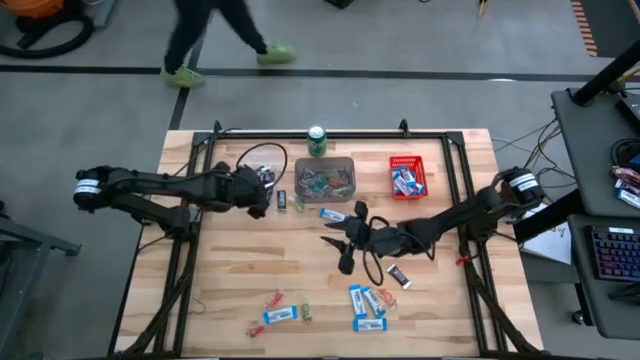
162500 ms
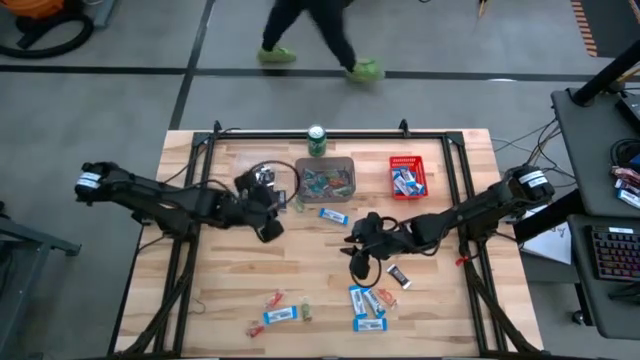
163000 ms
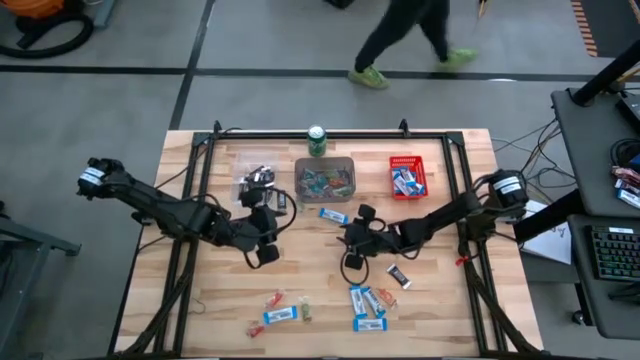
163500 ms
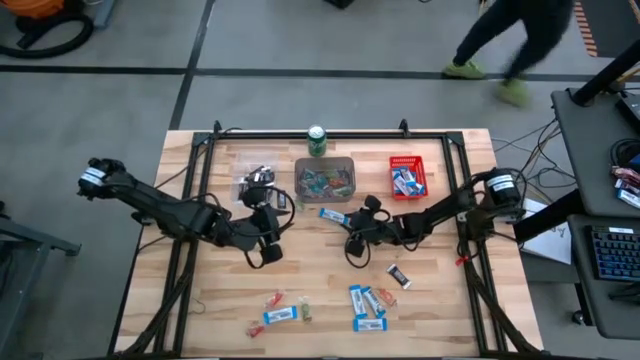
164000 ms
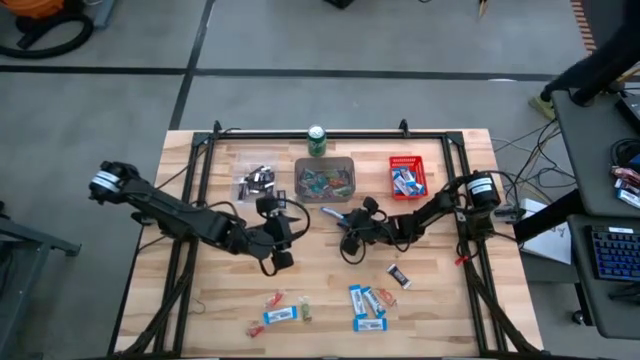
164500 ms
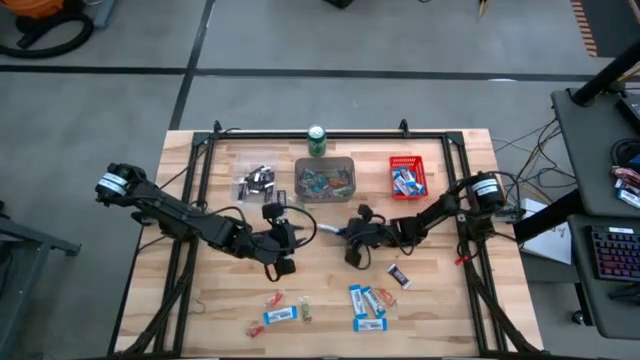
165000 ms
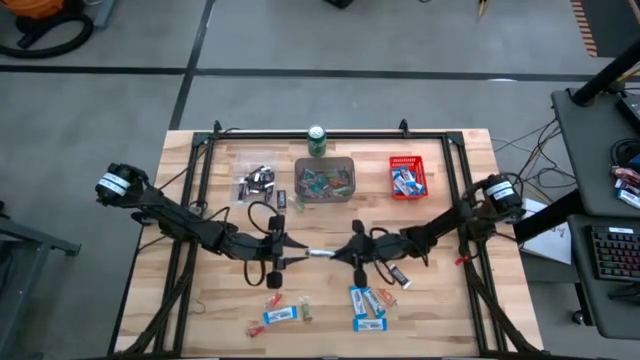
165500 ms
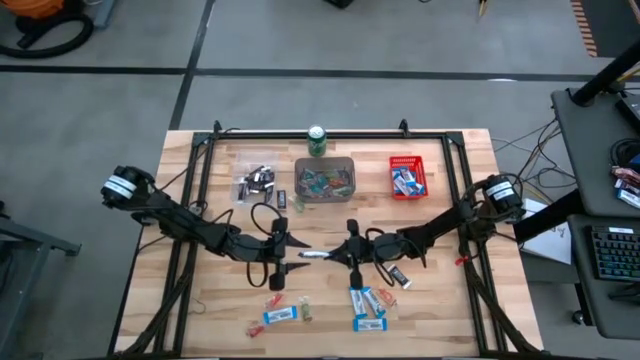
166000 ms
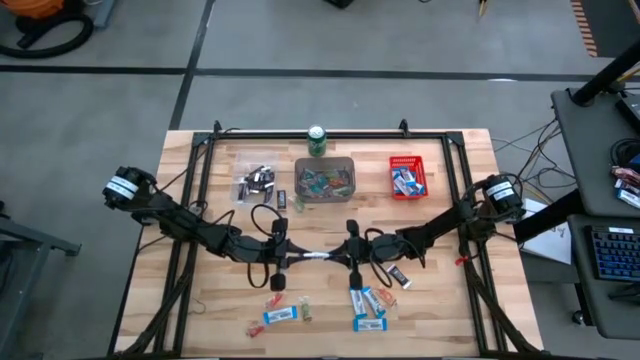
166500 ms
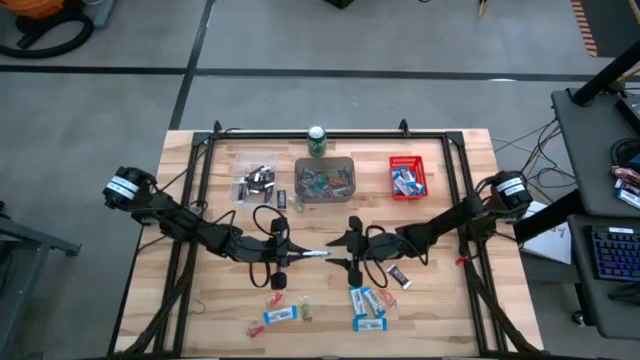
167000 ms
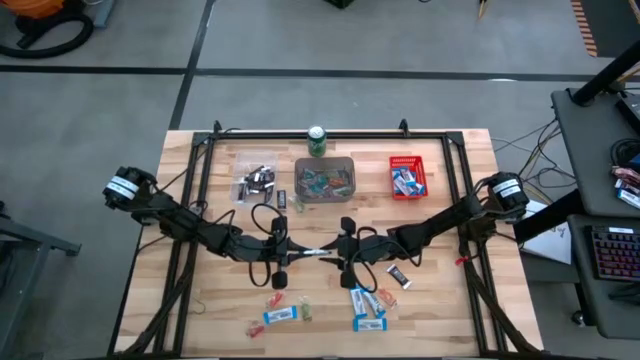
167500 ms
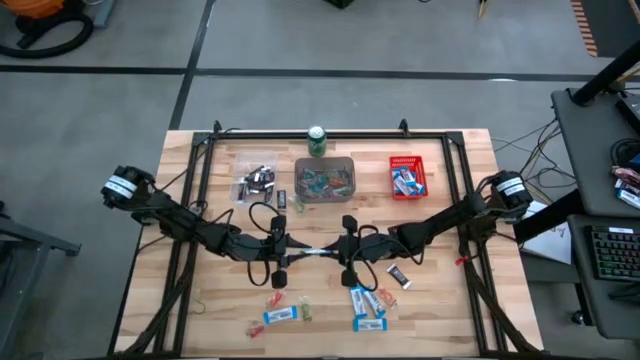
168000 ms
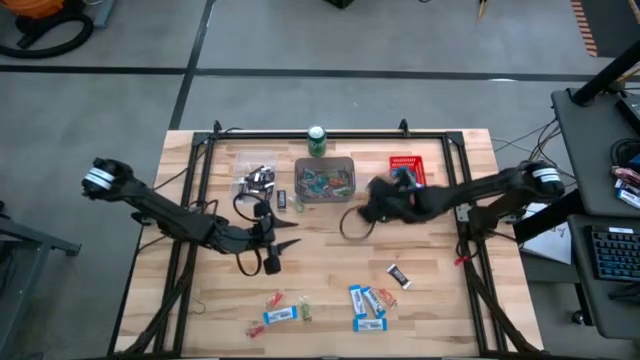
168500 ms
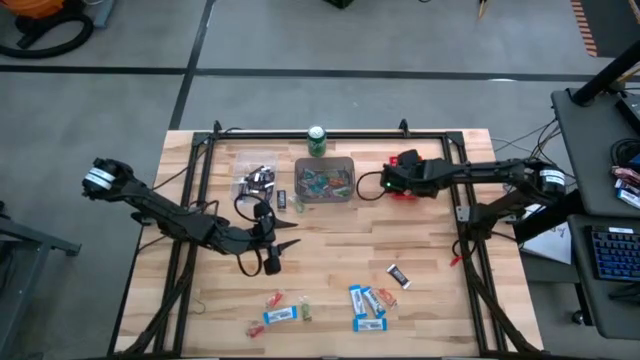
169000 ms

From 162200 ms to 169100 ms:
Task: Organize candy in baskets
Put the white chocolate bar into the red bin

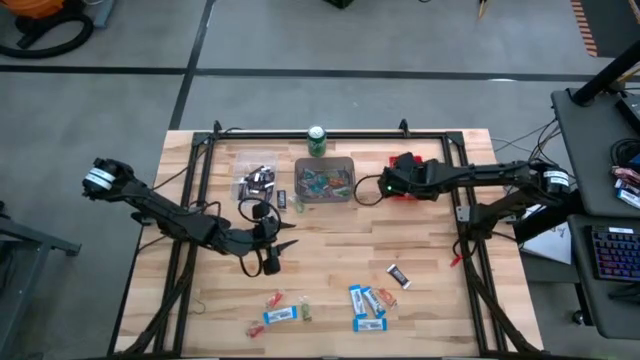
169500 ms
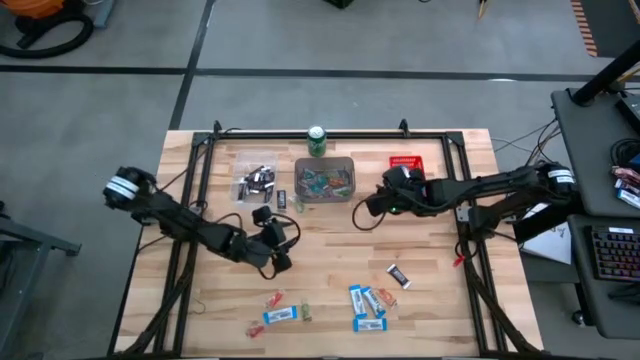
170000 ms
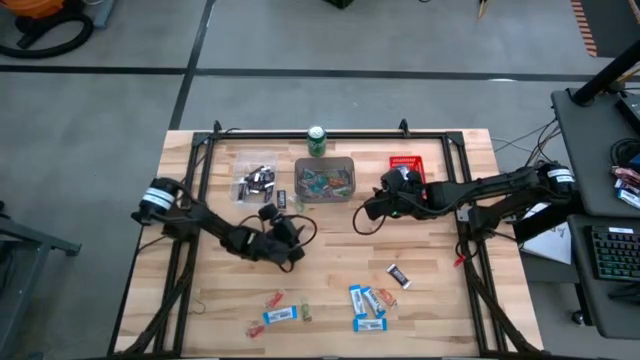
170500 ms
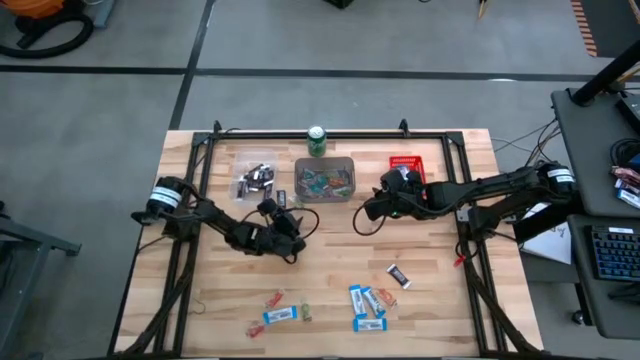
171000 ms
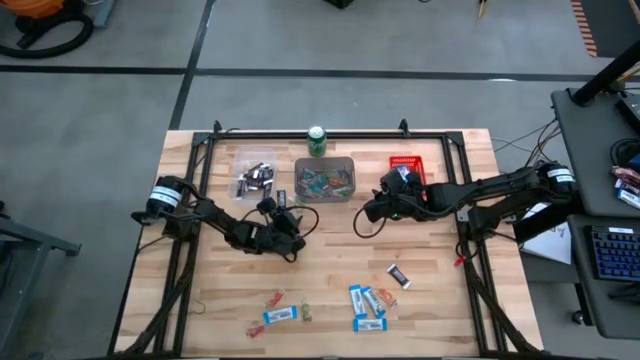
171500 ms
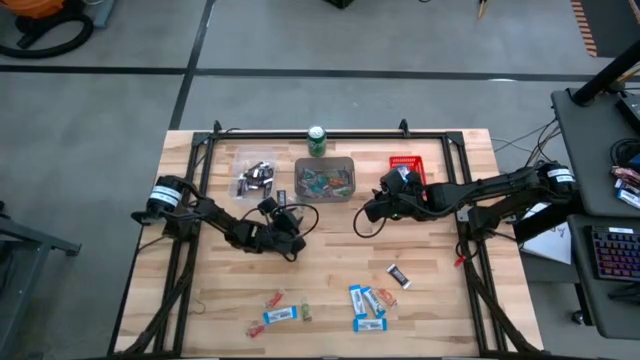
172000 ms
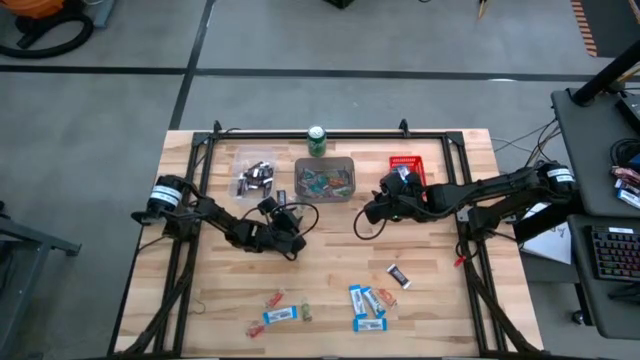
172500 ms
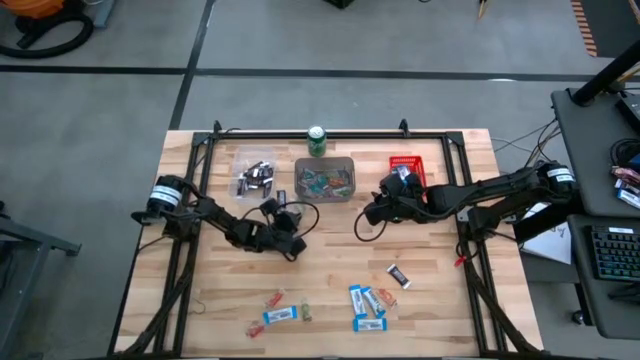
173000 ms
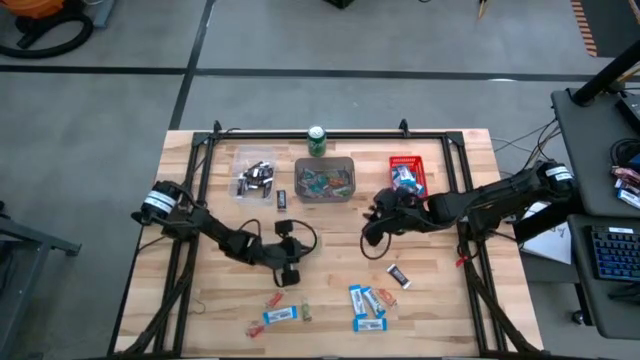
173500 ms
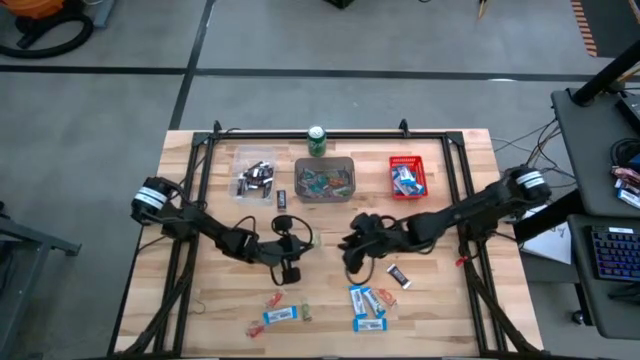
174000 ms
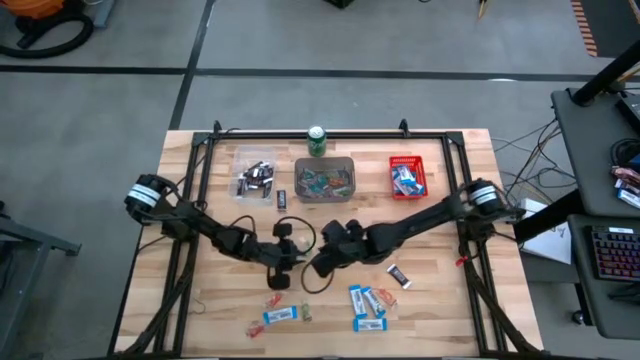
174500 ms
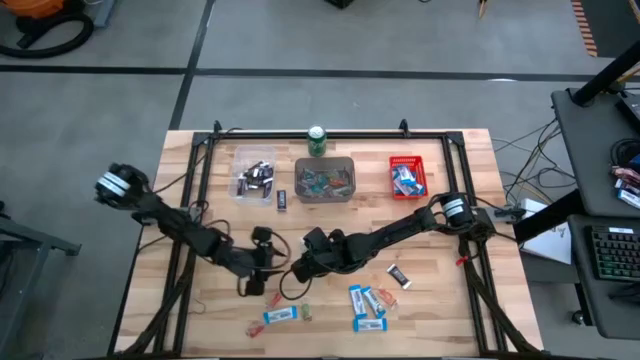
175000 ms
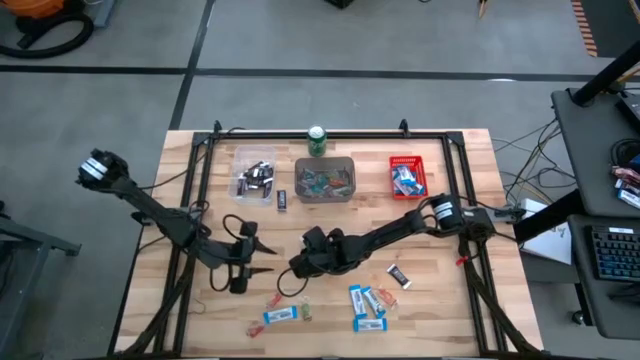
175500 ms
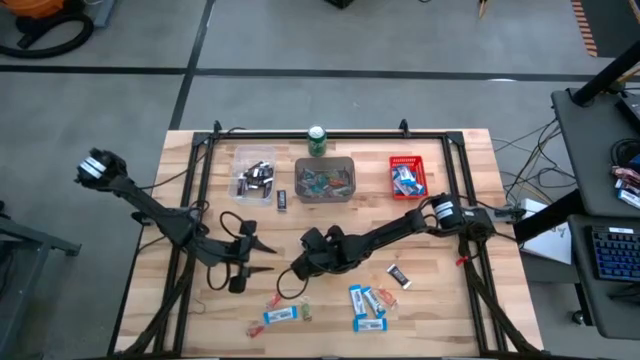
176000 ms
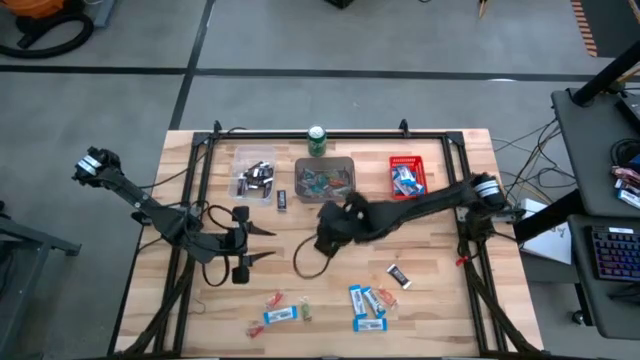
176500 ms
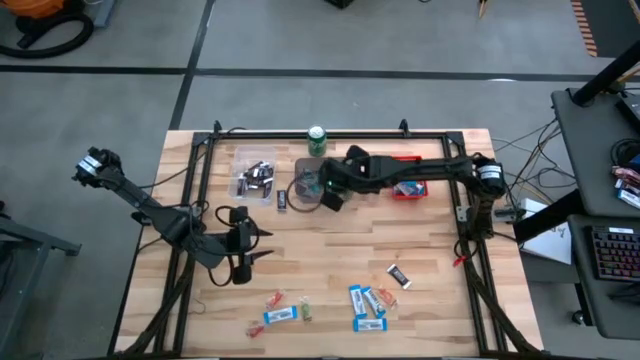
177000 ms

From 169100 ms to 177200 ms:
Put the green gummy into the black bin

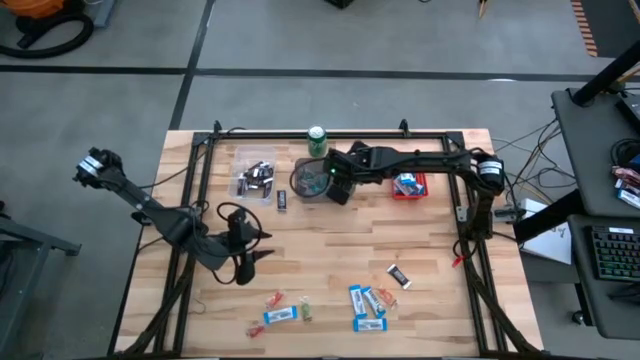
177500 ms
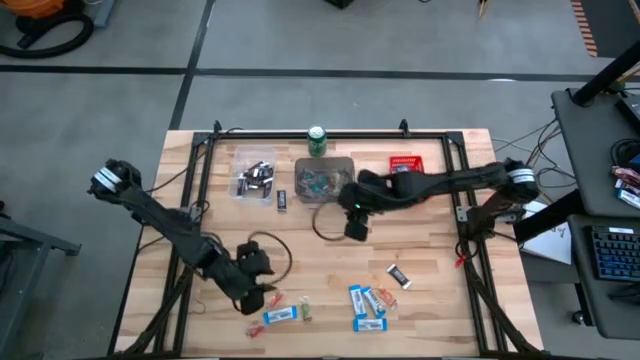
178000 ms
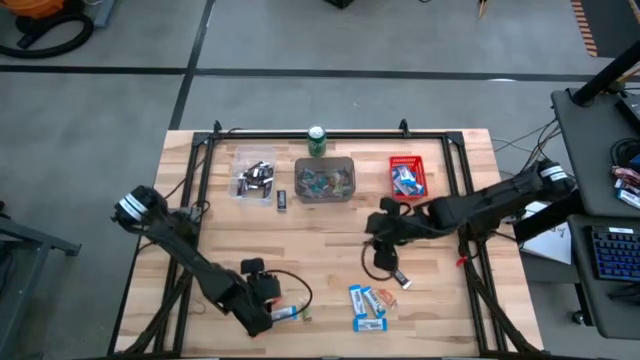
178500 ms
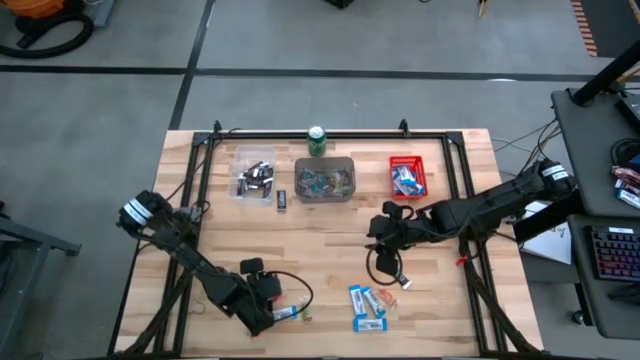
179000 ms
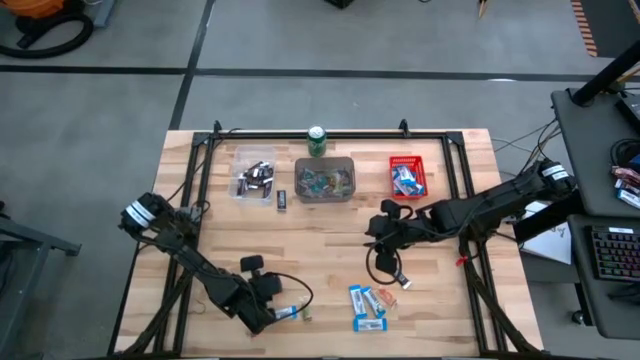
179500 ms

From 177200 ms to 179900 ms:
Put the orange gummy into the black bin

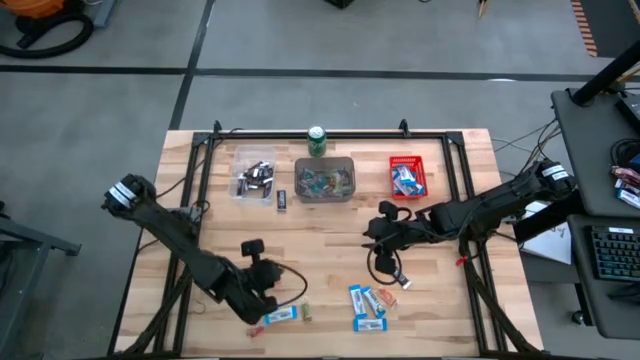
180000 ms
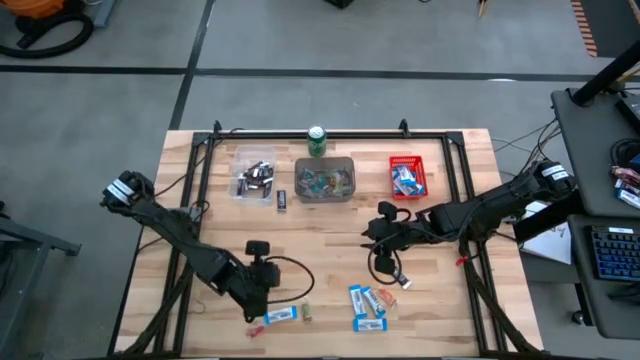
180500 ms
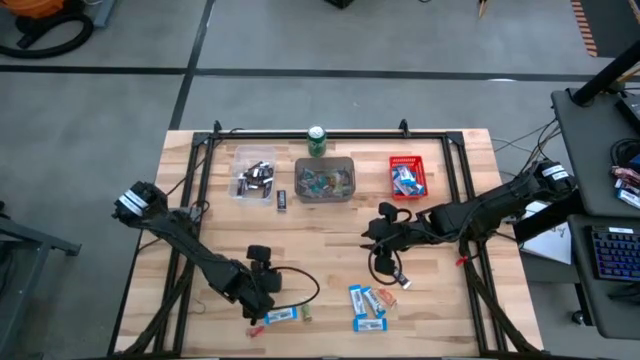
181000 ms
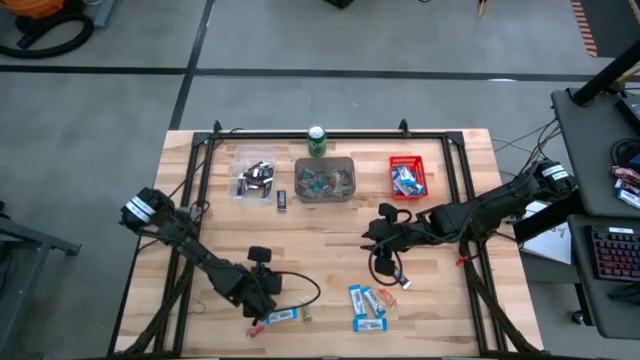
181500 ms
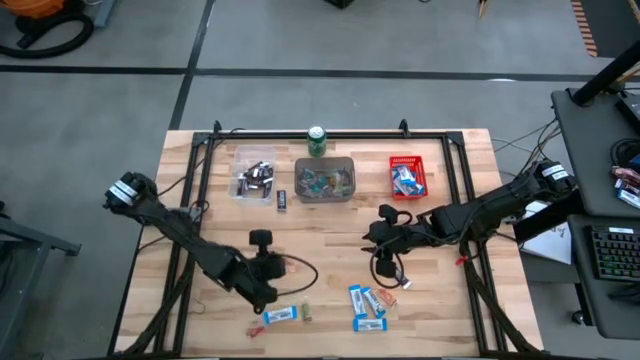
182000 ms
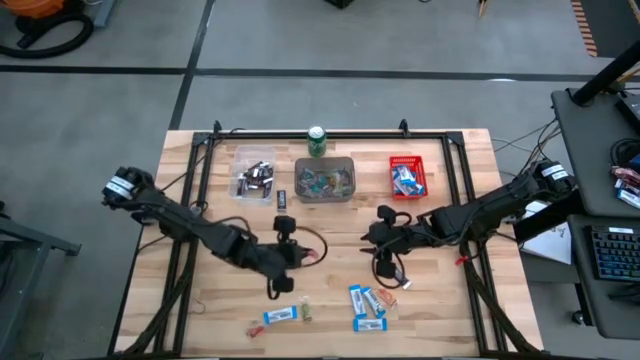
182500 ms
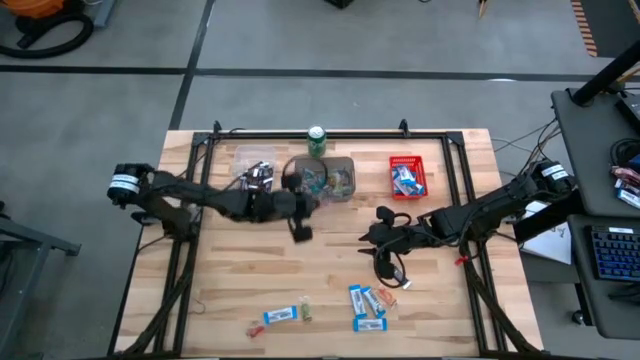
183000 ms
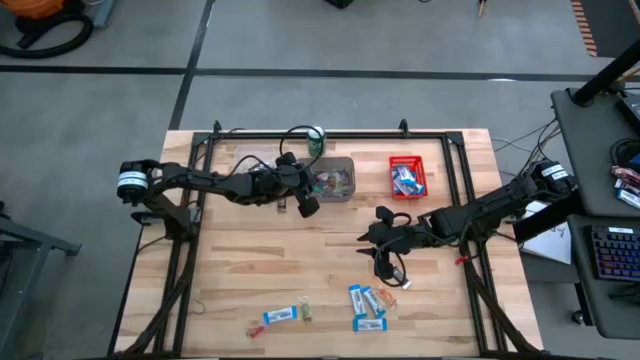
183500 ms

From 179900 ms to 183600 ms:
Put the orange gummy into the black bin
